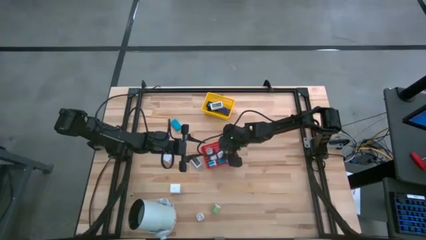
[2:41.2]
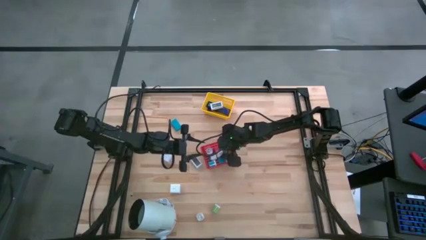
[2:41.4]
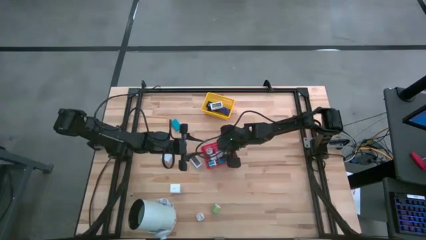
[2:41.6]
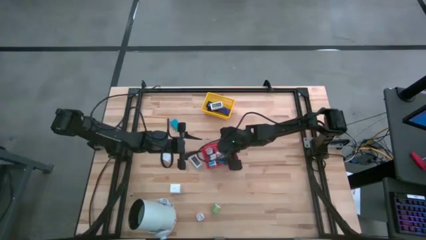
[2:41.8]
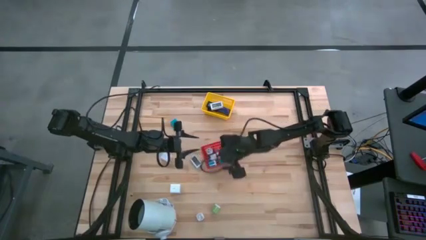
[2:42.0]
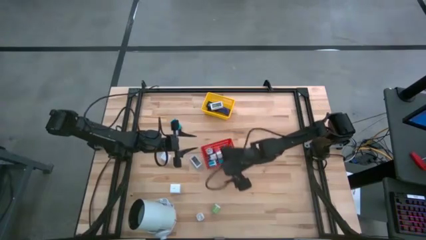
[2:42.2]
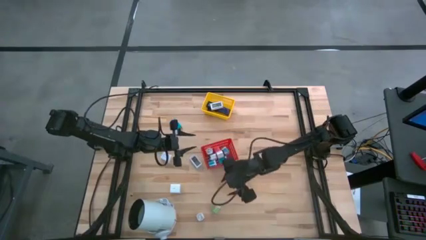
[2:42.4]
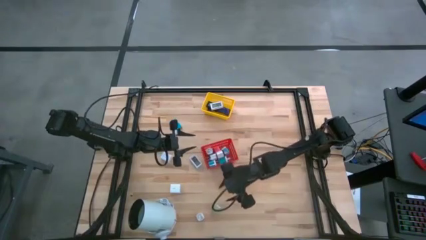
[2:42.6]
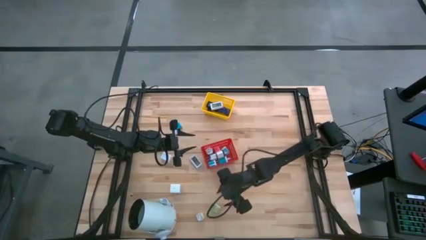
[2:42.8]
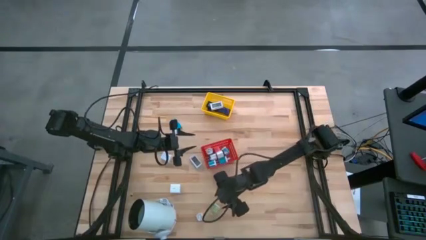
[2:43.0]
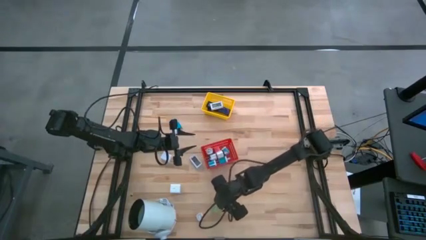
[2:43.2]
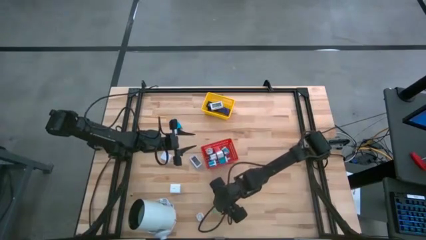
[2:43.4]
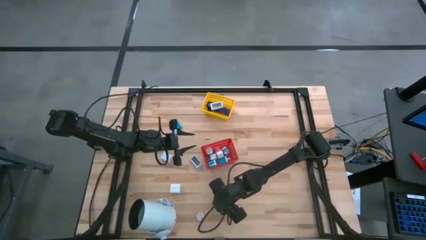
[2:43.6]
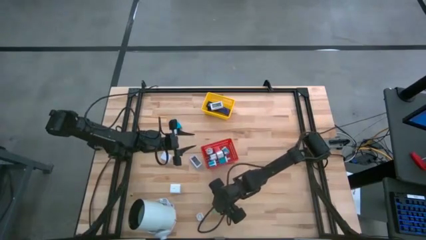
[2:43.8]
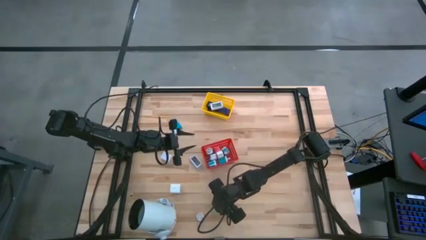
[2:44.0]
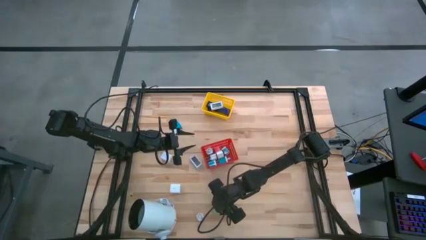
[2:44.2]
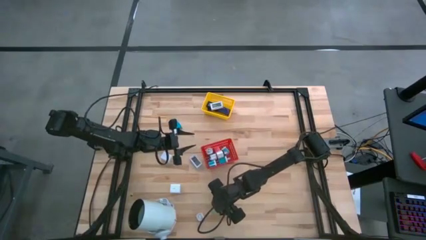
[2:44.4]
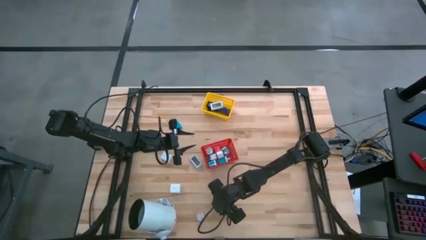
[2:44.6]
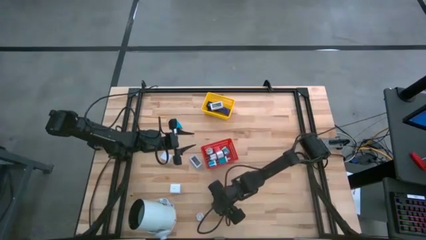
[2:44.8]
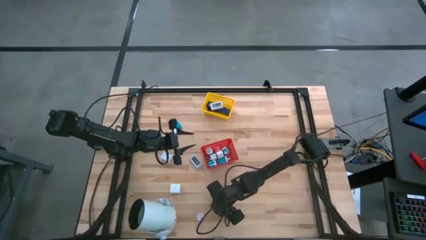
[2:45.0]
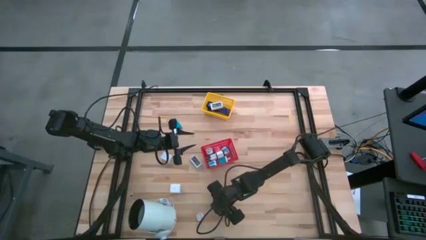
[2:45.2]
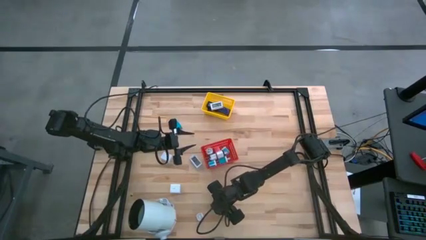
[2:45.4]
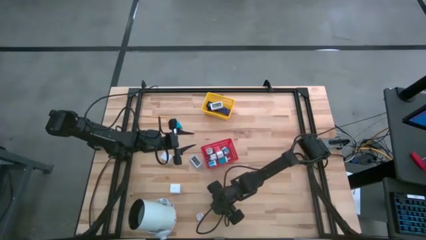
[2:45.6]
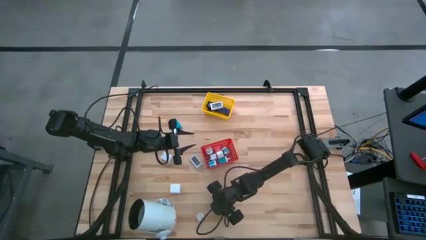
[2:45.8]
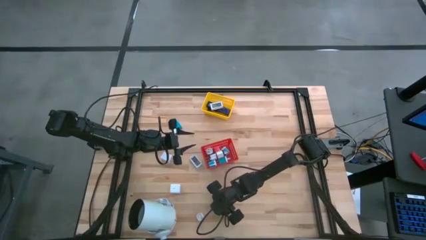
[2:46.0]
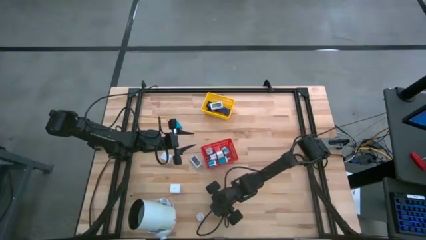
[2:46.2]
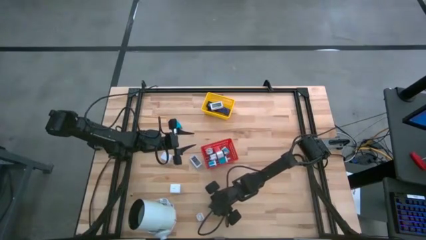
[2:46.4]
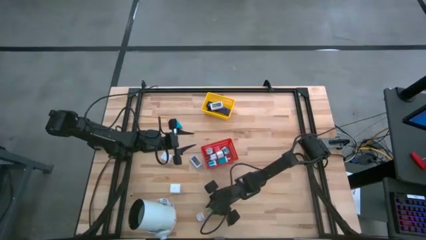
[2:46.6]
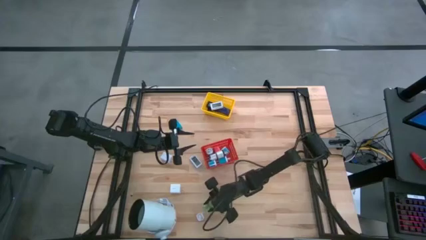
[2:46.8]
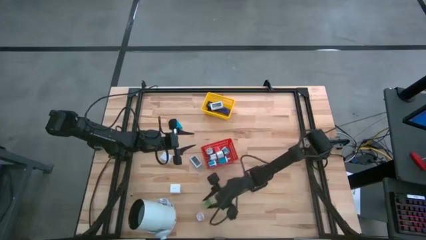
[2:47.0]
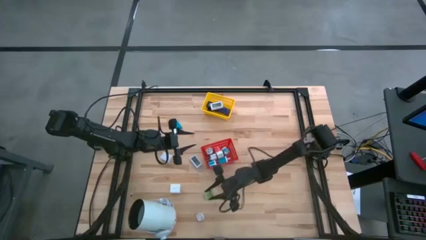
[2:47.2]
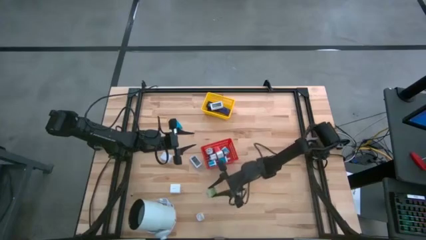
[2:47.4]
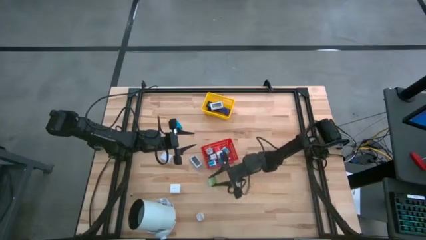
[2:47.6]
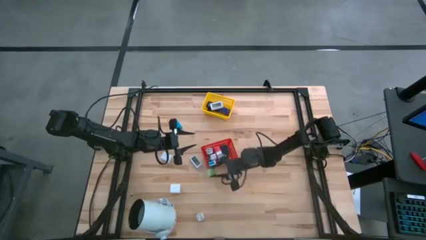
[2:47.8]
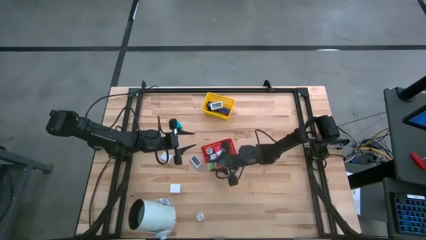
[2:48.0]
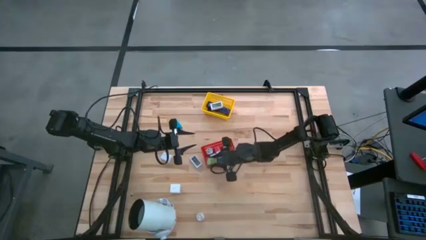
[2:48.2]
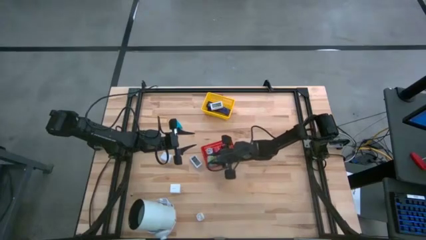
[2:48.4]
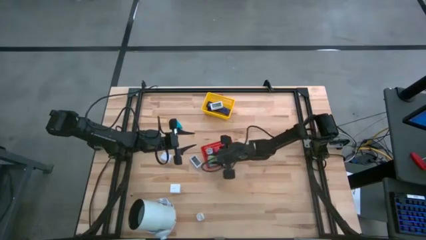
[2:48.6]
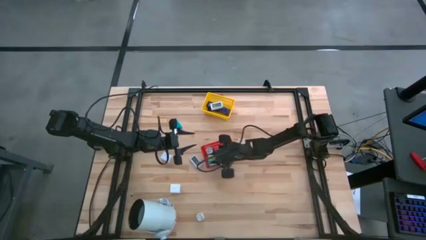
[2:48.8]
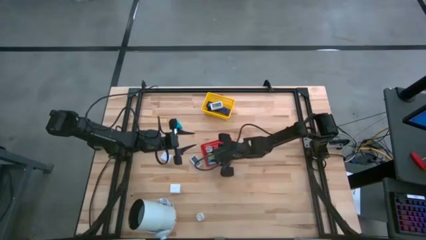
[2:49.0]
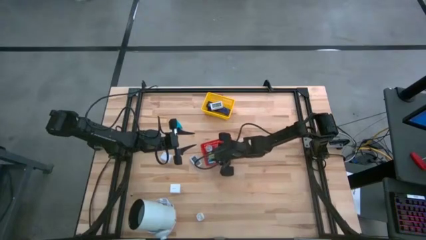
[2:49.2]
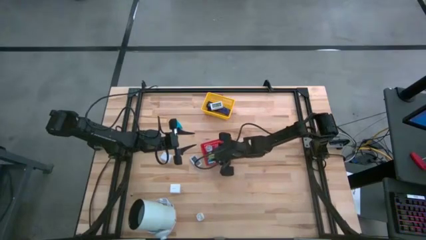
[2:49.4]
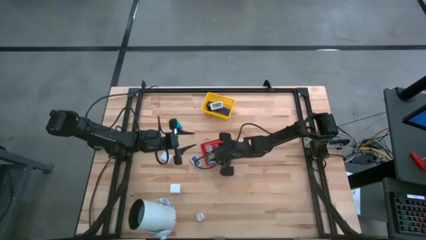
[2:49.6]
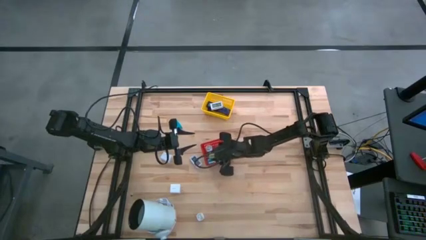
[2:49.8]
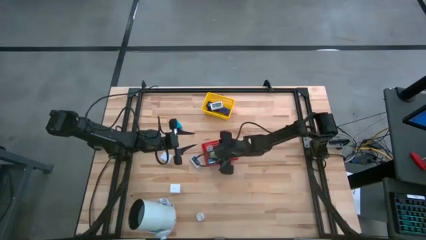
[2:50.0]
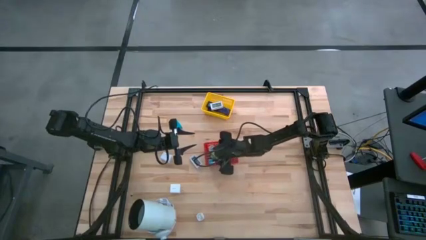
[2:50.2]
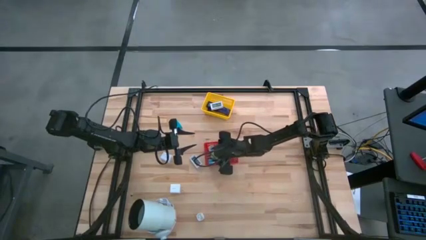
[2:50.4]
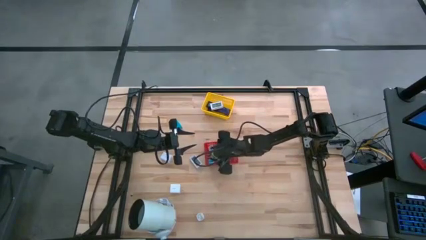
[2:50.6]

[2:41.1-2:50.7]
Task: Pick & Place Office items
Put the green and white charger adapter into the red bin

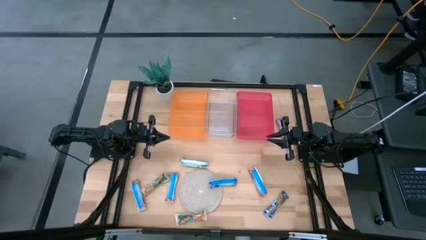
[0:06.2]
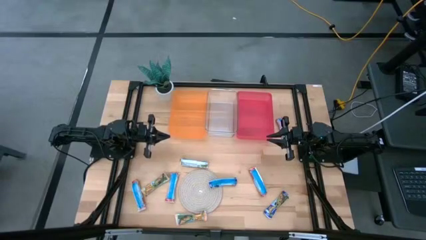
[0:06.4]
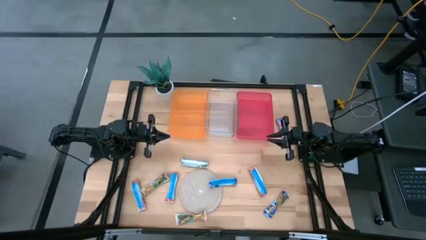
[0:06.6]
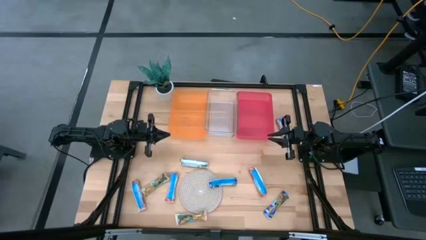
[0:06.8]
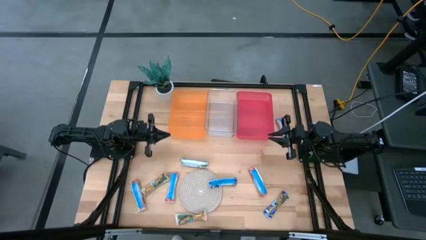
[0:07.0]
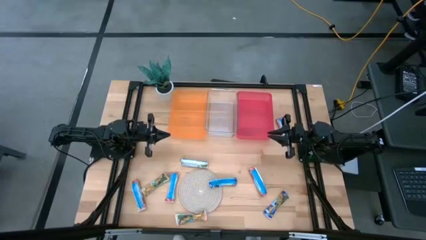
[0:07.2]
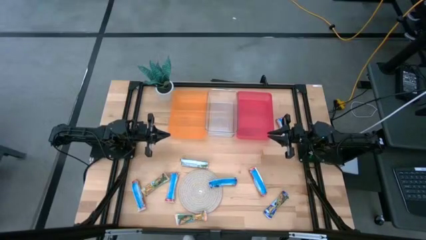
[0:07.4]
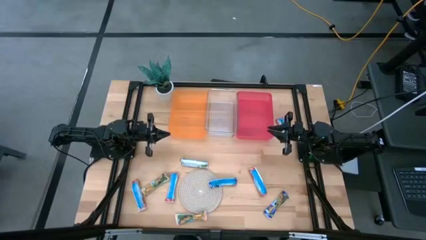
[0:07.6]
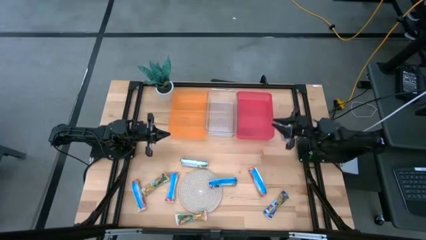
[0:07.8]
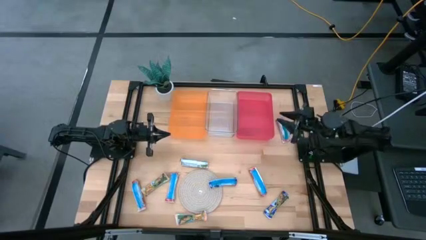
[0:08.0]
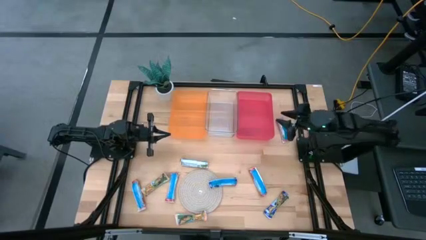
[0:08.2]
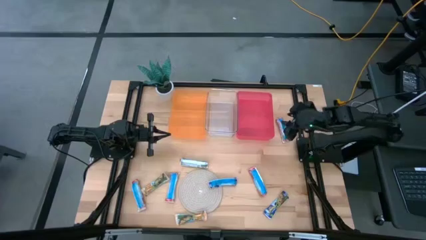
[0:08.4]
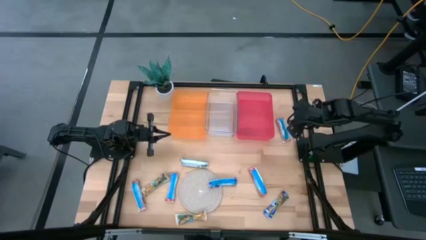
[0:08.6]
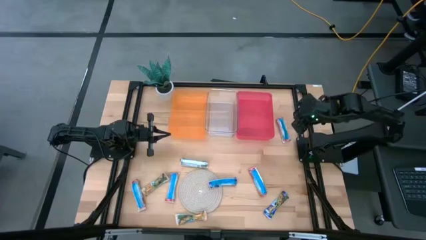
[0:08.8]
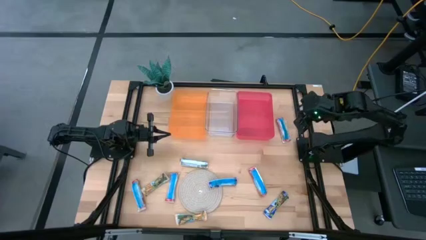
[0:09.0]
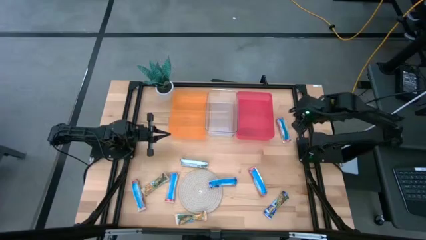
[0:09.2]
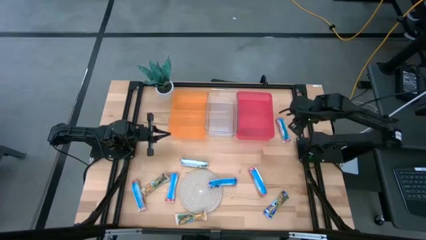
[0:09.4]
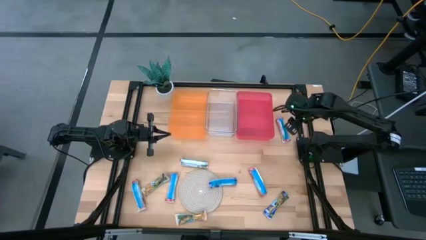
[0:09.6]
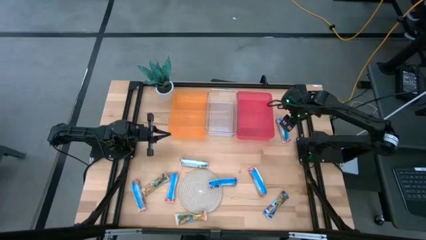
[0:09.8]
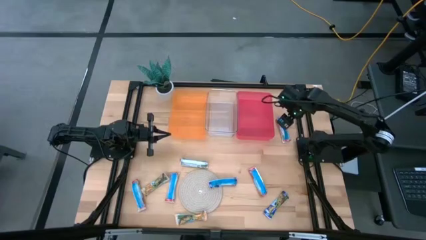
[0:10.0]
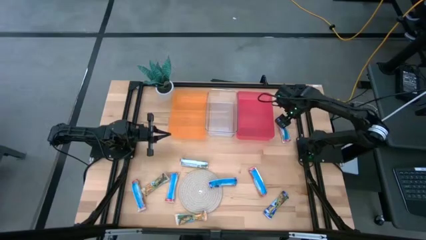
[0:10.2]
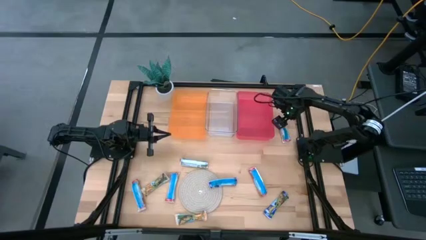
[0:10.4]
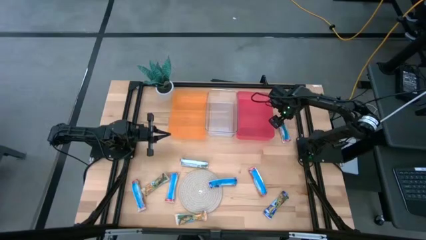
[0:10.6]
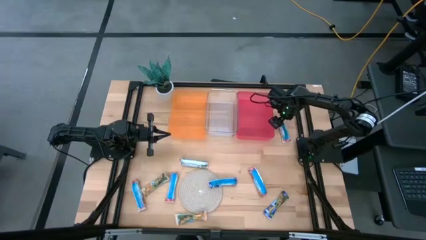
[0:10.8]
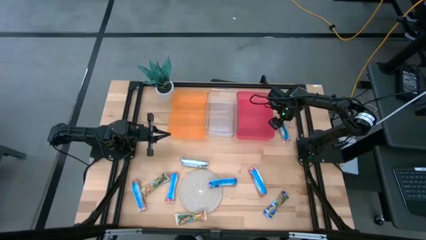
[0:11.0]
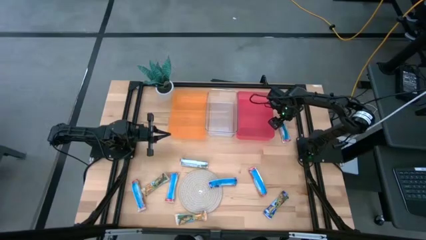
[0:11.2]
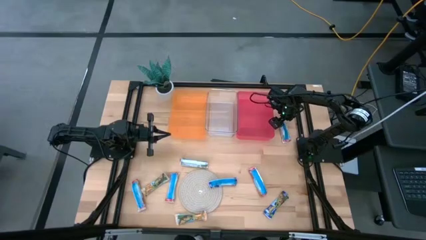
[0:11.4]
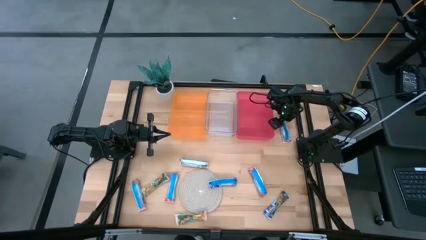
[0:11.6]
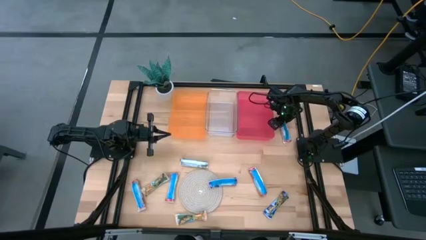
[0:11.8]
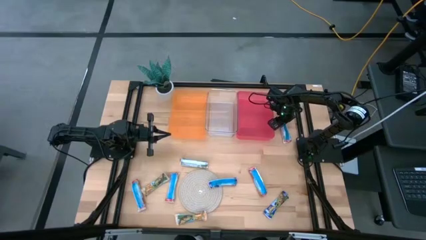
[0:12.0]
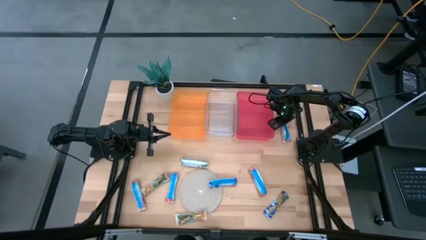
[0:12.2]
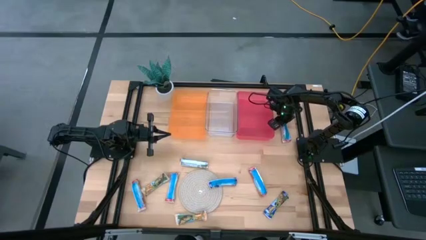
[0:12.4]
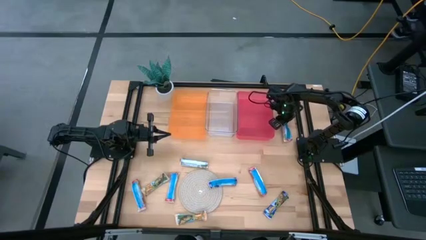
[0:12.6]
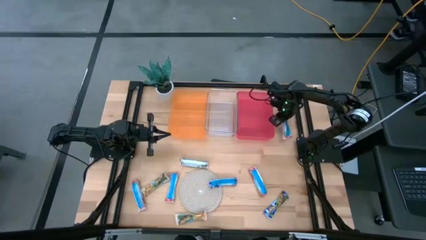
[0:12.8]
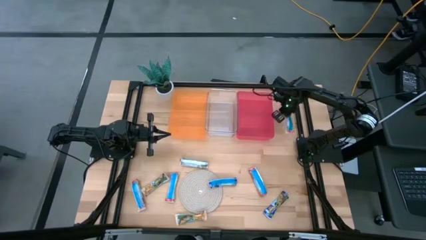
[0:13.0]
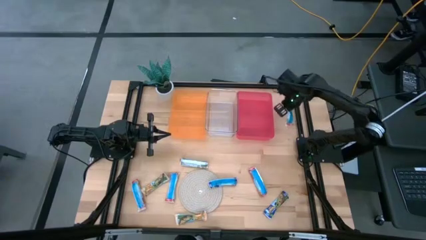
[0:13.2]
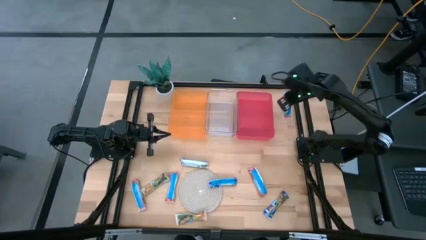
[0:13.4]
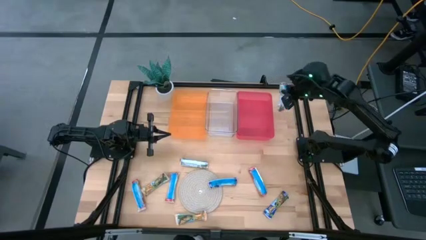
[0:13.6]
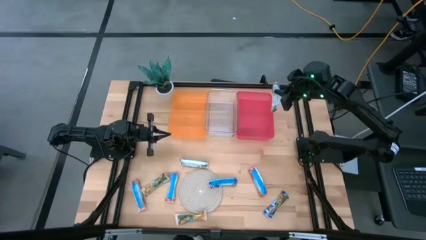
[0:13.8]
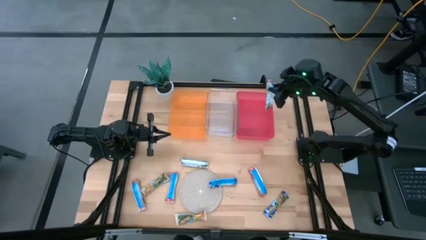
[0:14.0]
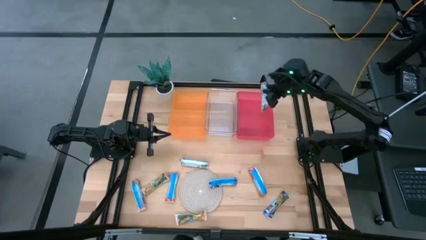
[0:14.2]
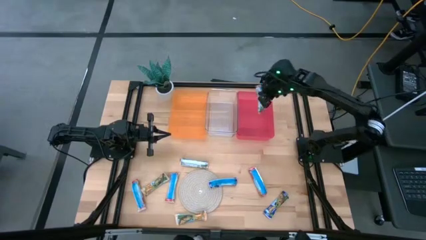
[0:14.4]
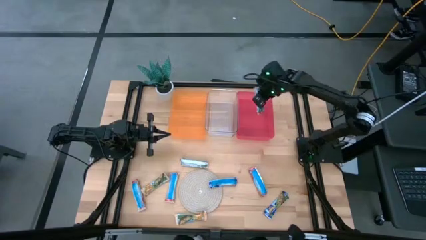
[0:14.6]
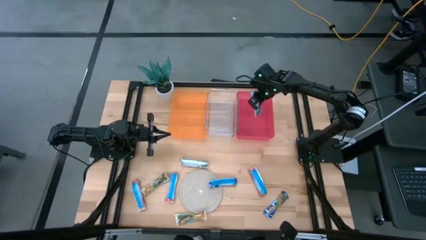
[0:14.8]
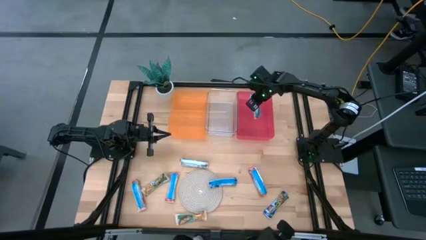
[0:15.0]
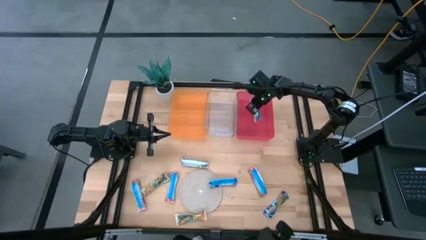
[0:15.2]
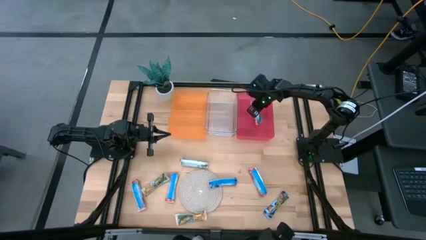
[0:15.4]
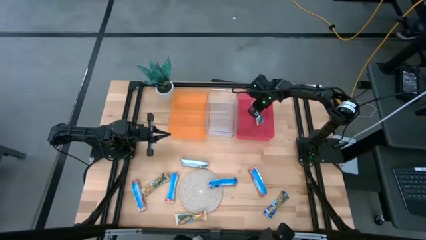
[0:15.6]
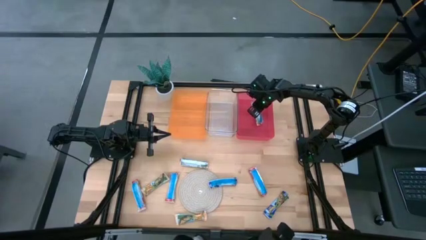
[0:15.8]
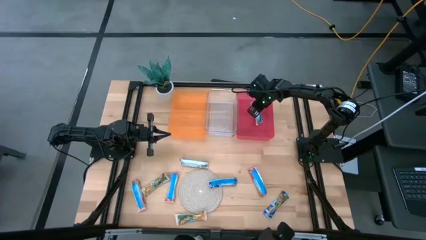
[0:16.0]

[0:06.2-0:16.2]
Task: Pick and place Granola Bars by type
Put the red granola bar into the pink bin
